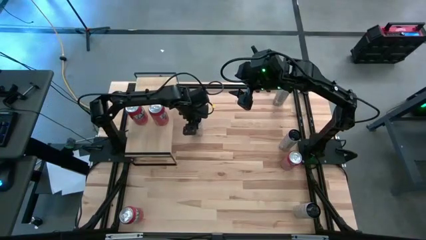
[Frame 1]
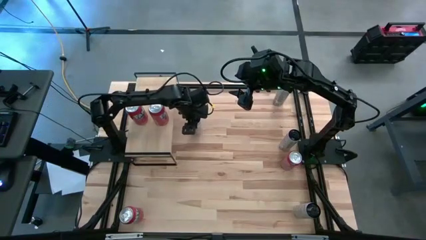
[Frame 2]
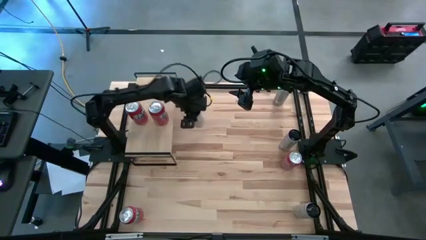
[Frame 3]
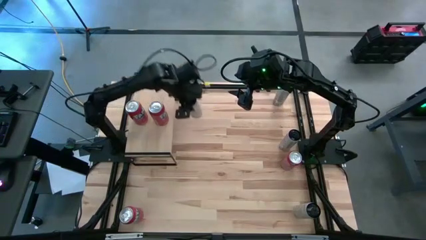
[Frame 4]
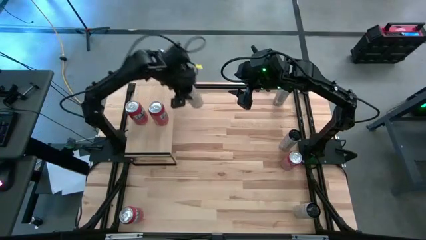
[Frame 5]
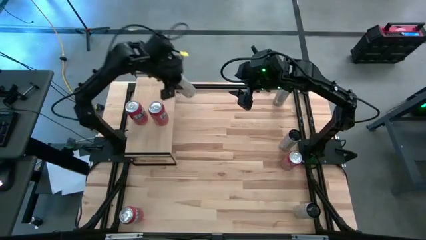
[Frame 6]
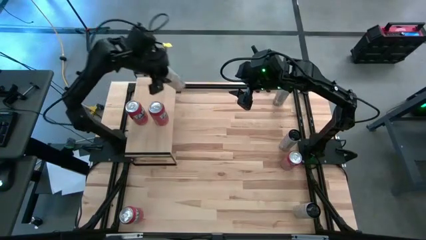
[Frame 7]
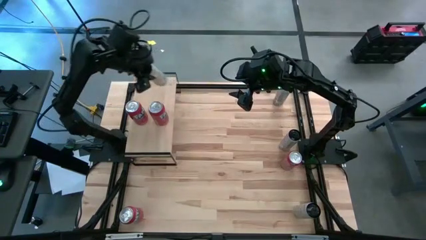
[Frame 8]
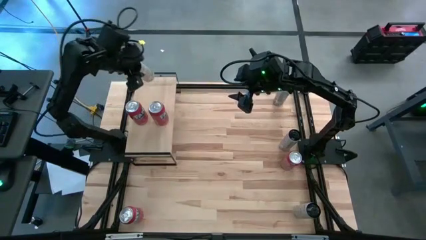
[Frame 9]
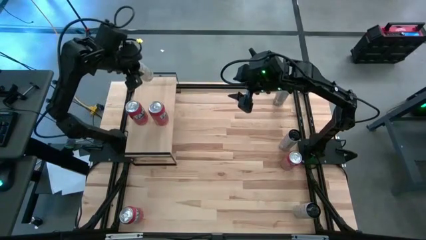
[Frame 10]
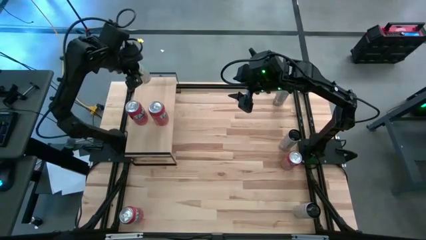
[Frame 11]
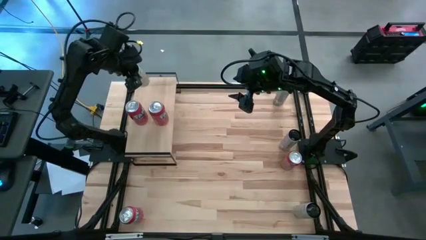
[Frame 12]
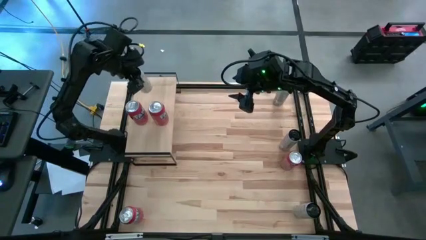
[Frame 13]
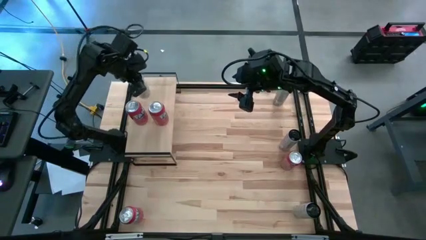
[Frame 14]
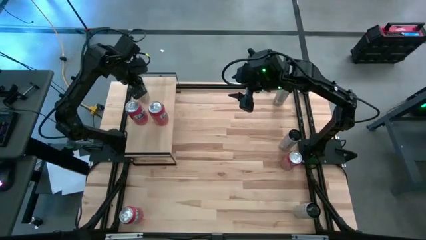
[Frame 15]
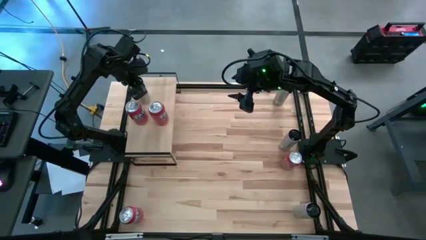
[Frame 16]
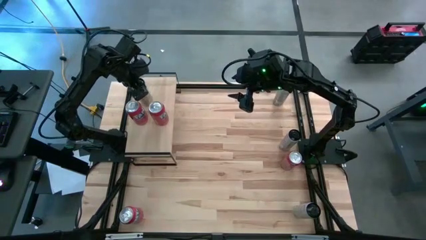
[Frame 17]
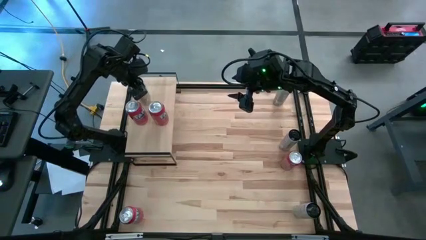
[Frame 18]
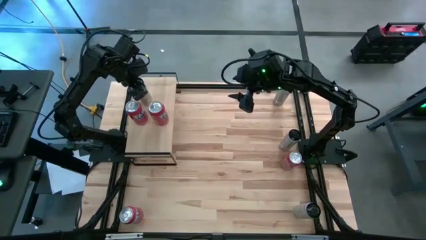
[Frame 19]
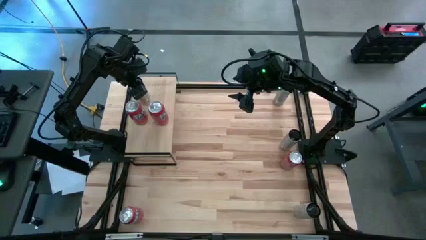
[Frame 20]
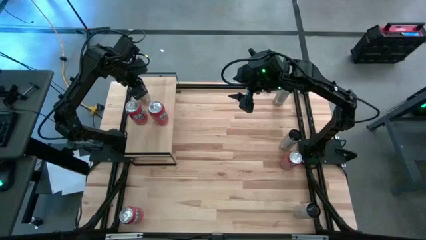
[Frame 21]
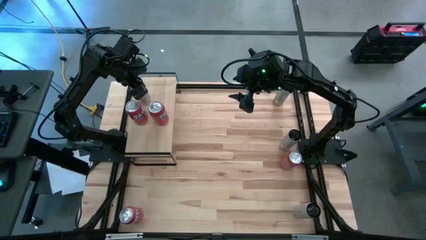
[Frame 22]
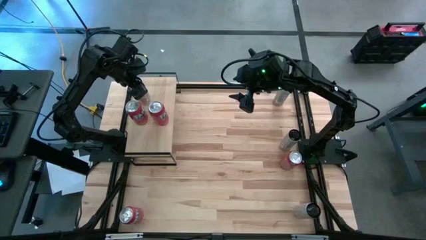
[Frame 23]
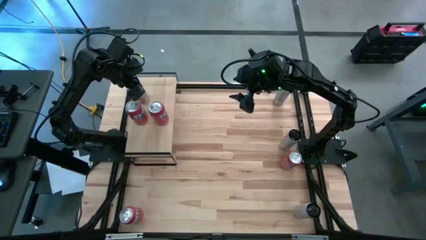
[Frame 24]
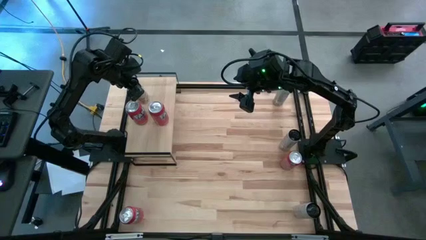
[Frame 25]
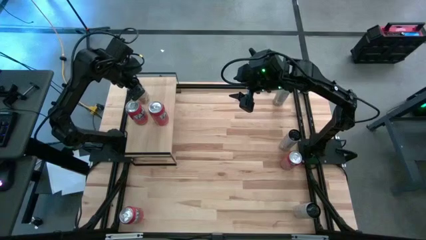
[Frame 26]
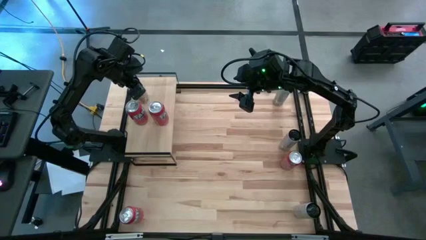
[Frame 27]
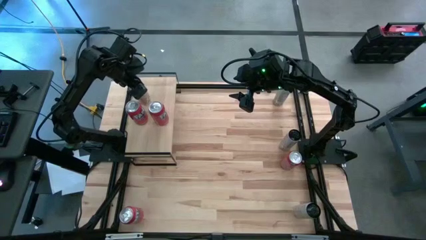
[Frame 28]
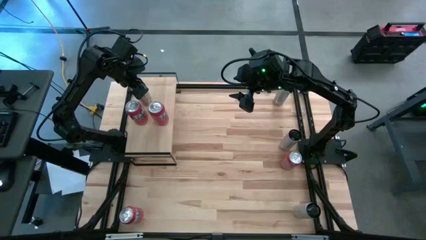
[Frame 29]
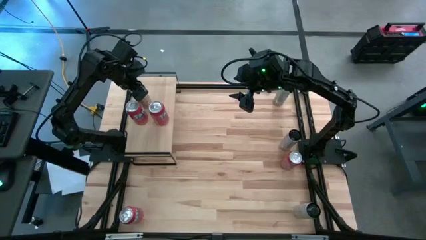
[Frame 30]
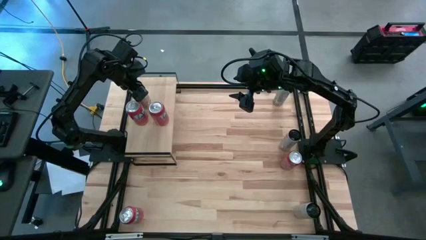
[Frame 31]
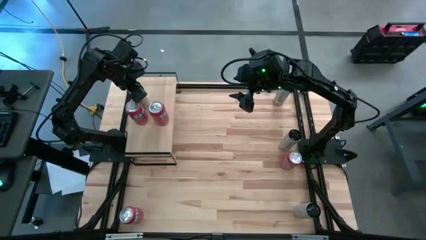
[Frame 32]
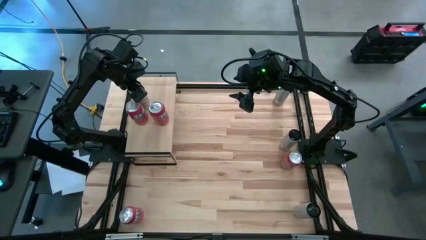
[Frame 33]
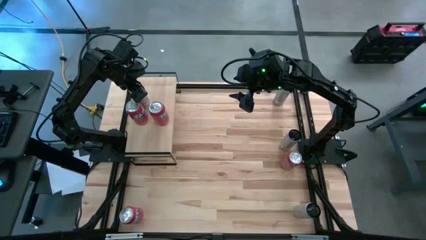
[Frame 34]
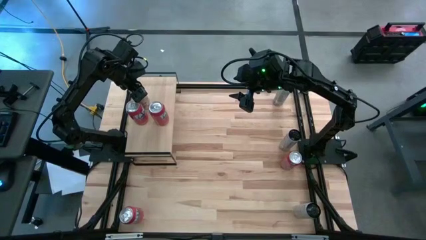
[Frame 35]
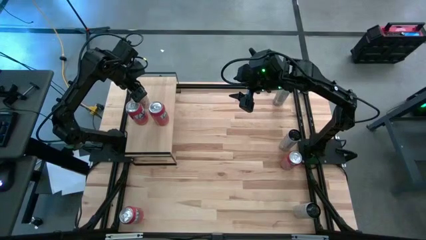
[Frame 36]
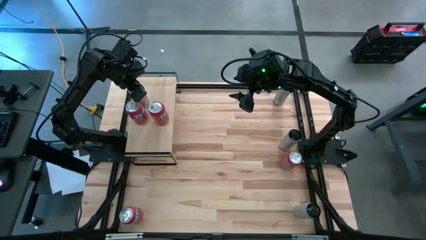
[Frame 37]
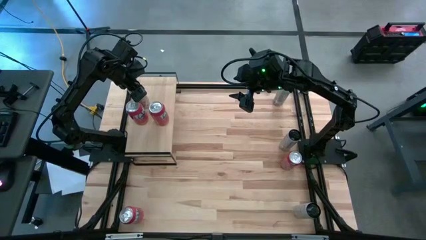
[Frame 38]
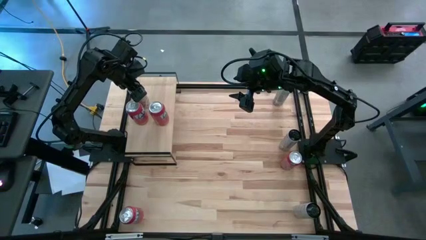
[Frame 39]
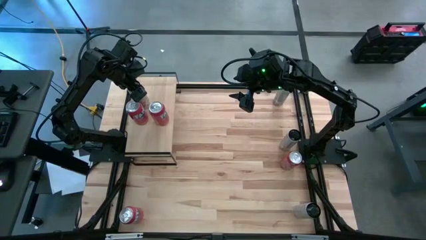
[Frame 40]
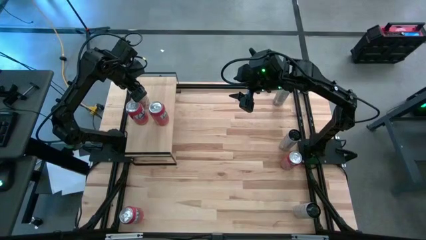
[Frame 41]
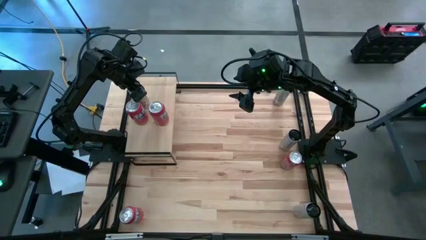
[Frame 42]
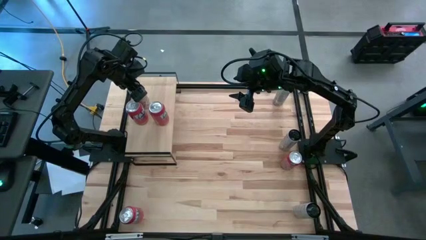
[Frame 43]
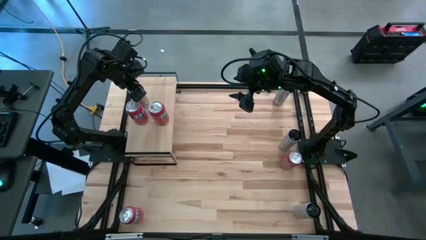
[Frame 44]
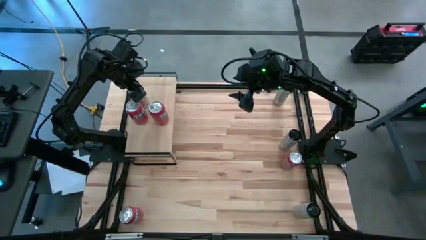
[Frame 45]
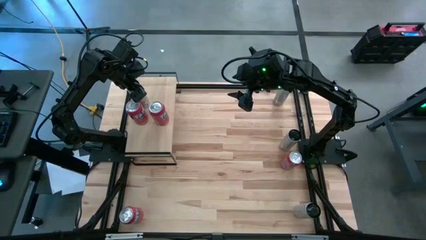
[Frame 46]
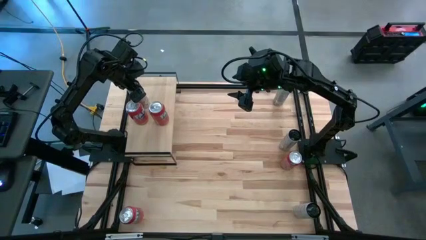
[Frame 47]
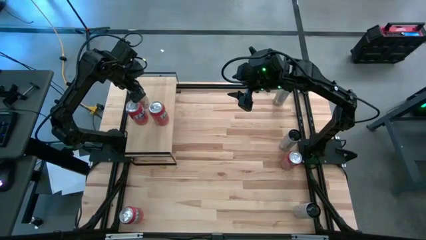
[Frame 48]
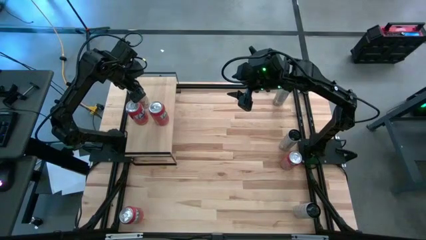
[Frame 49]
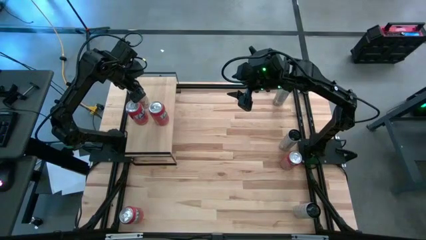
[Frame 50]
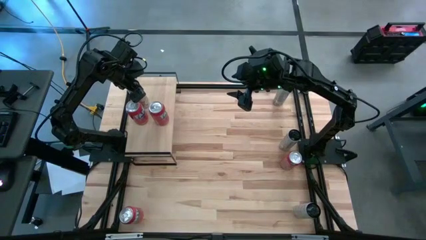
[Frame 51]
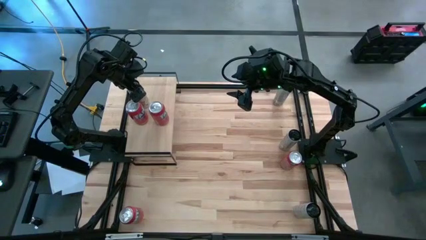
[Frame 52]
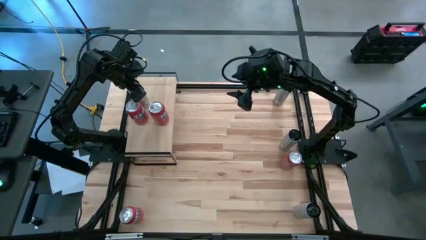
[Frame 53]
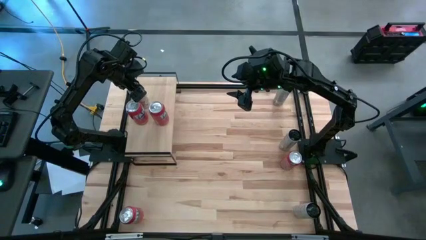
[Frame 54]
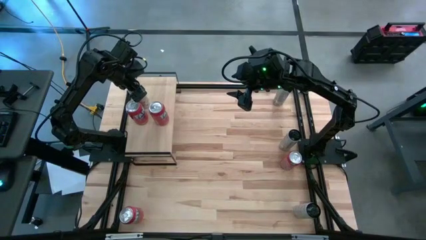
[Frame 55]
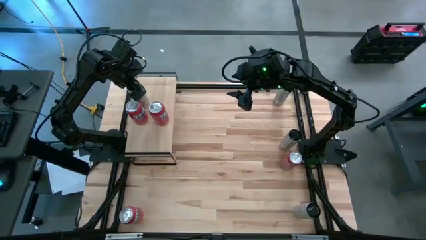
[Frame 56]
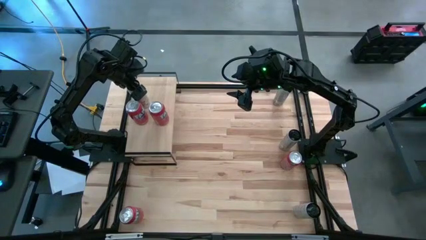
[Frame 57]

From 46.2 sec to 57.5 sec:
Task: Place canned beverage on shelf
Put the top left white yellow soda can on the shelf

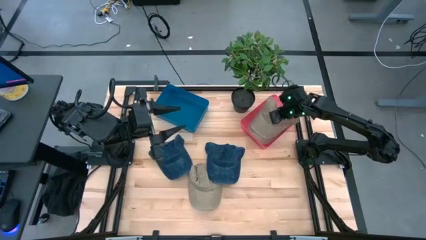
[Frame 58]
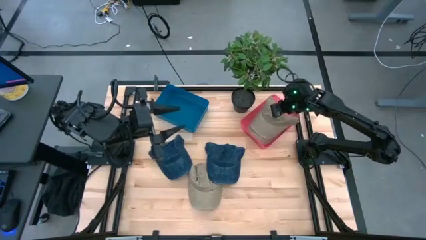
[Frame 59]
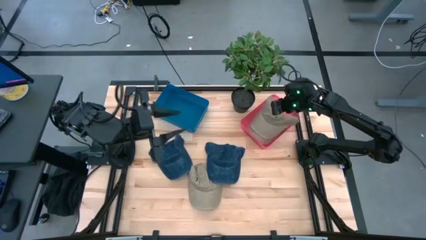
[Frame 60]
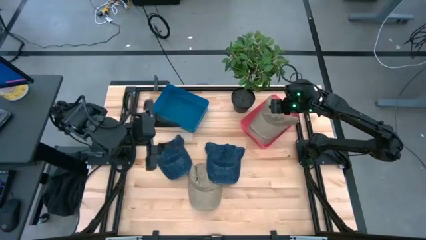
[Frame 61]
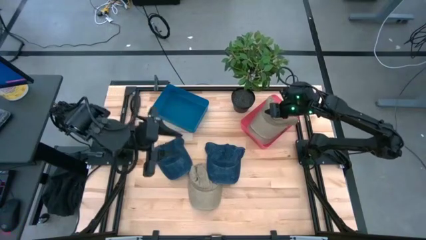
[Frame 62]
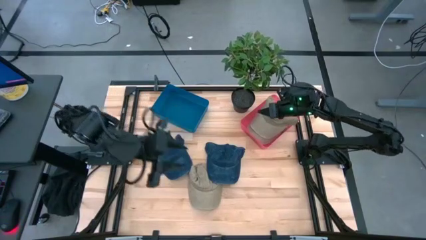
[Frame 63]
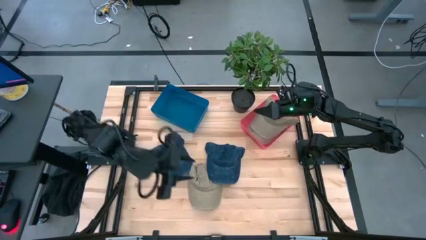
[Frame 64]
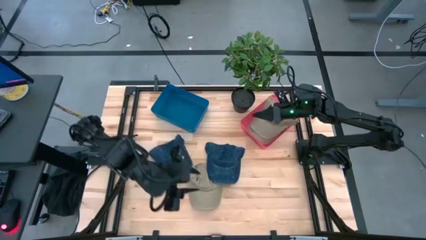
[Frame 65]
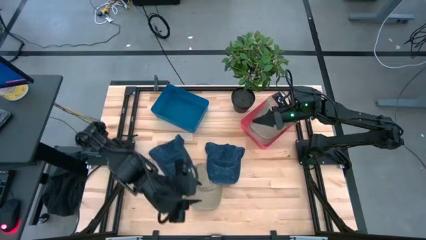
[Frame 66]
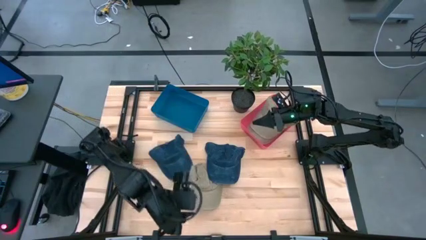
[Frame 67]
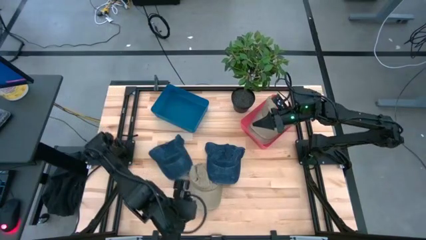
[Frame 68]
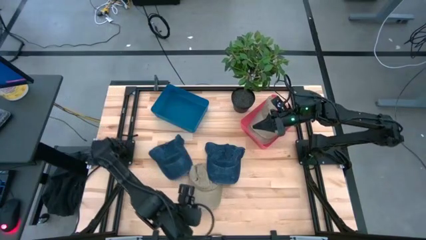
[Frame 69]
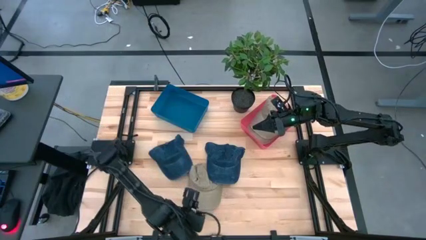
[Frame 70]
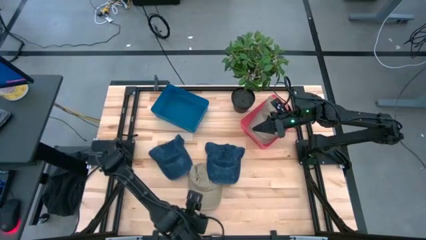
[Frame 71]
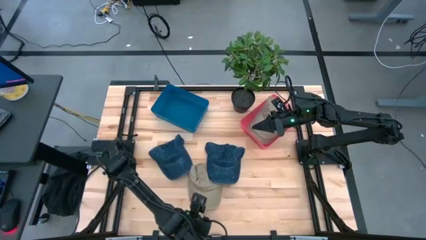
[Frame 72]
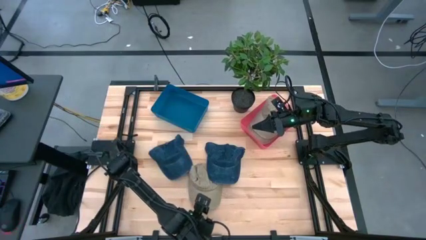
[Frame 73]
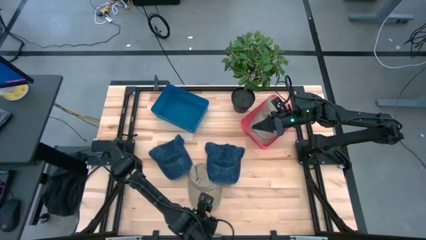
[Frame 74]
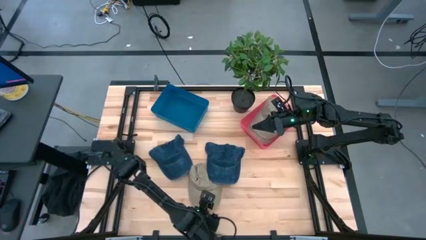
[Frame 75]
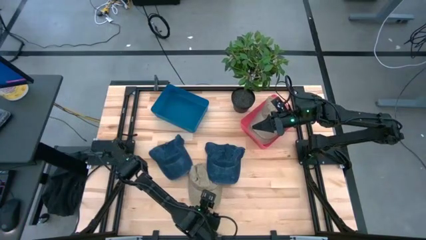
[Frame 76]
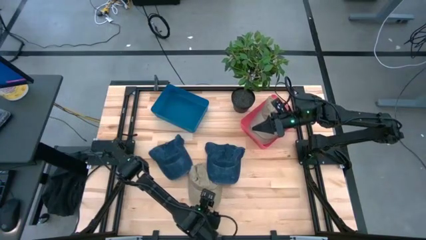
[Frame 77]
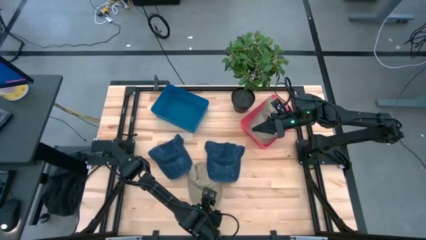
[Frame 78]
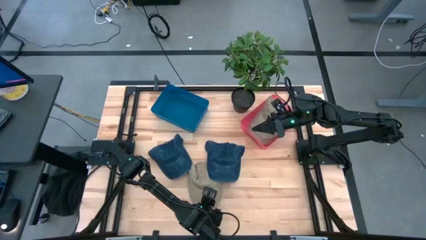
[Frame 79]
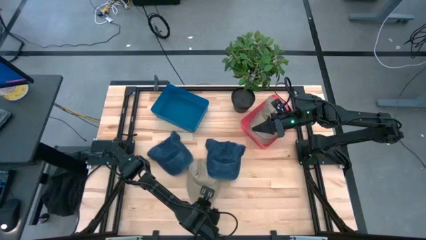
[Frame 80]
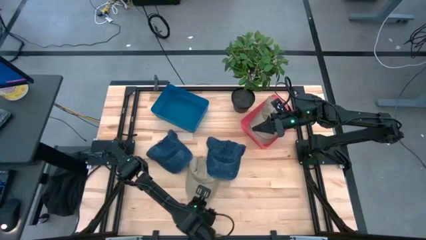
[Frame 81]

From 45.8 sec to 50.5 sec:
Task: Pick & Place hat
Put the brown cap into the red bin
